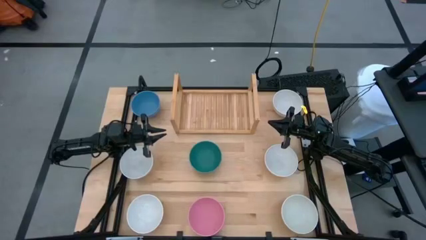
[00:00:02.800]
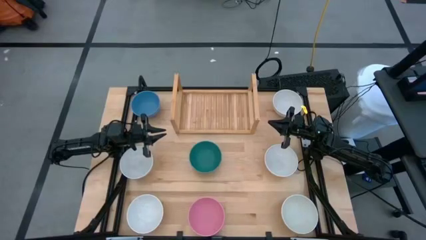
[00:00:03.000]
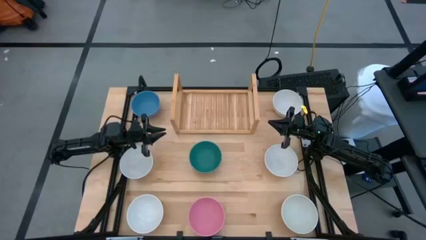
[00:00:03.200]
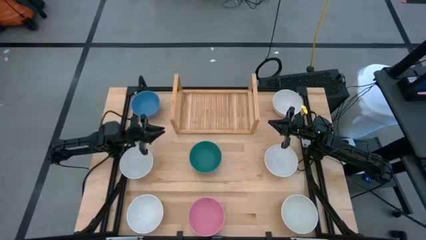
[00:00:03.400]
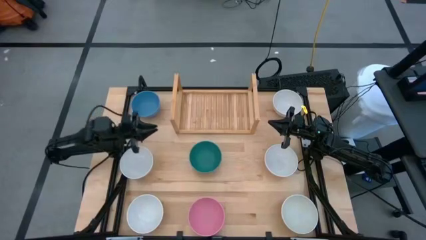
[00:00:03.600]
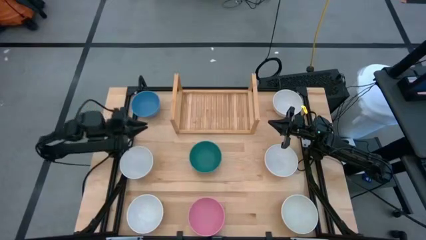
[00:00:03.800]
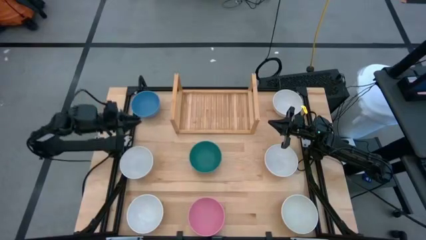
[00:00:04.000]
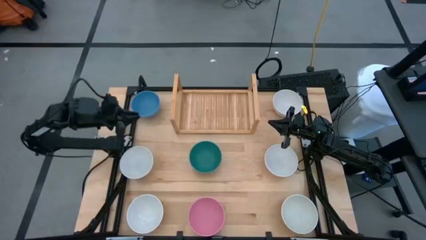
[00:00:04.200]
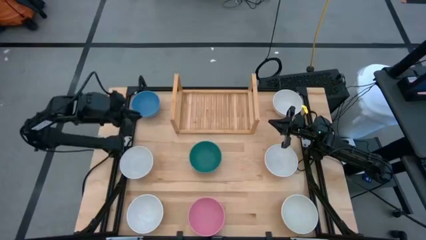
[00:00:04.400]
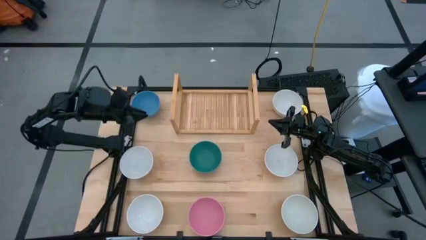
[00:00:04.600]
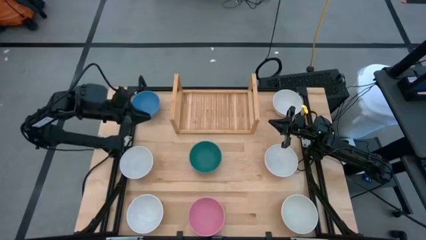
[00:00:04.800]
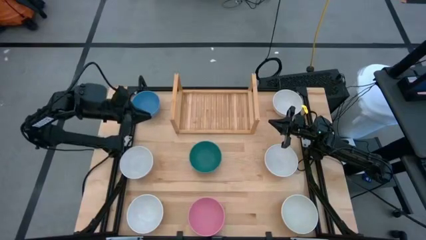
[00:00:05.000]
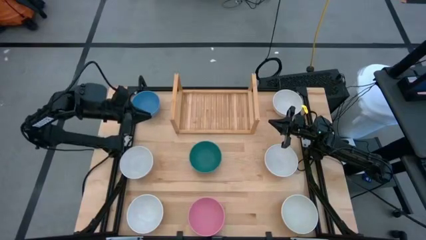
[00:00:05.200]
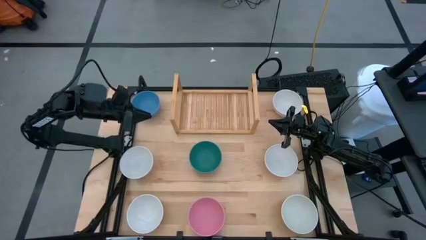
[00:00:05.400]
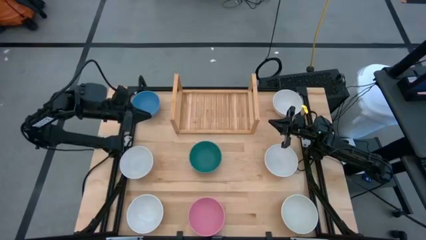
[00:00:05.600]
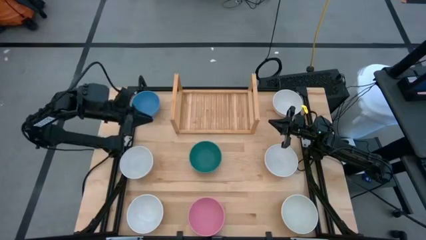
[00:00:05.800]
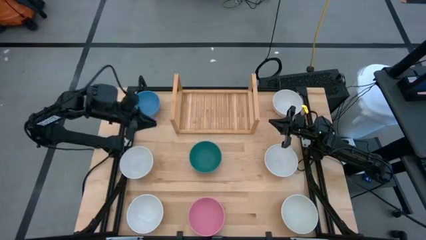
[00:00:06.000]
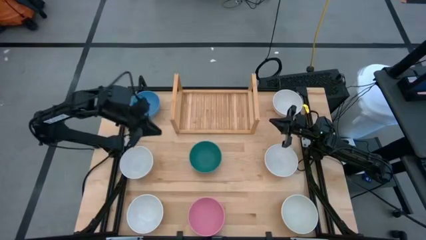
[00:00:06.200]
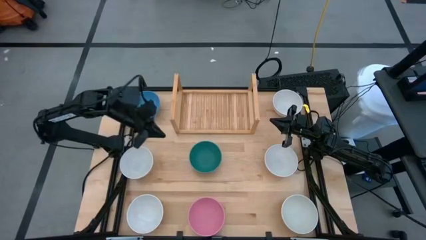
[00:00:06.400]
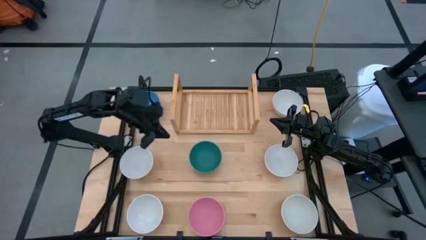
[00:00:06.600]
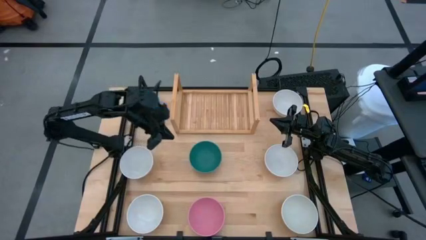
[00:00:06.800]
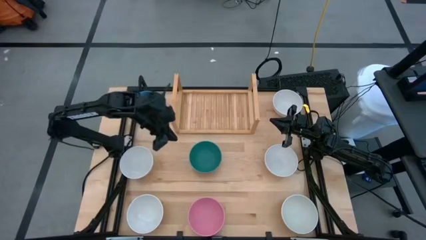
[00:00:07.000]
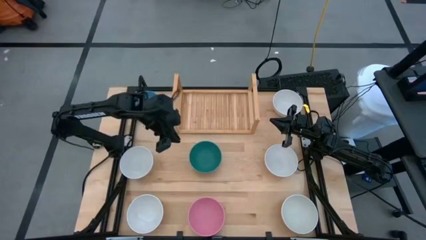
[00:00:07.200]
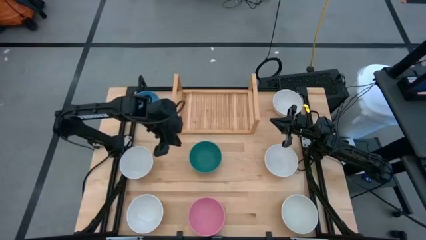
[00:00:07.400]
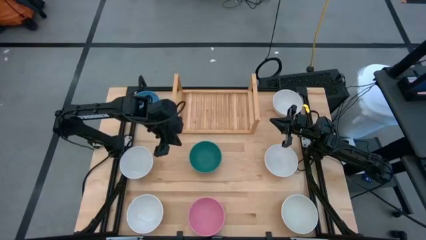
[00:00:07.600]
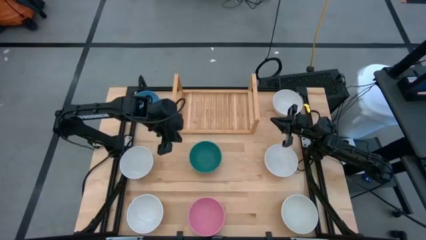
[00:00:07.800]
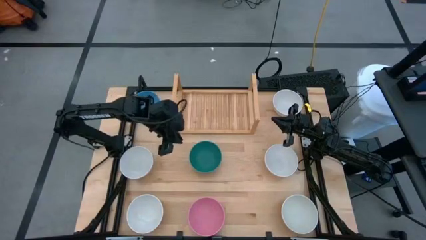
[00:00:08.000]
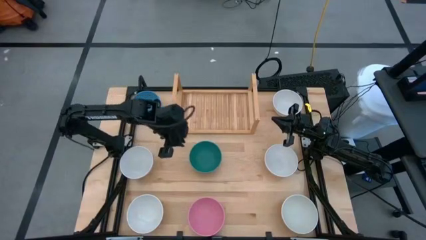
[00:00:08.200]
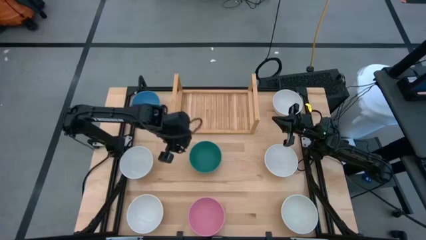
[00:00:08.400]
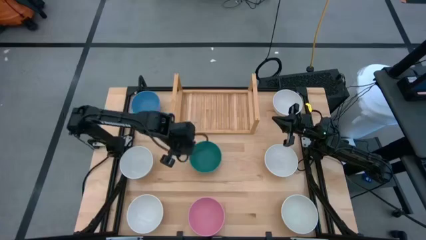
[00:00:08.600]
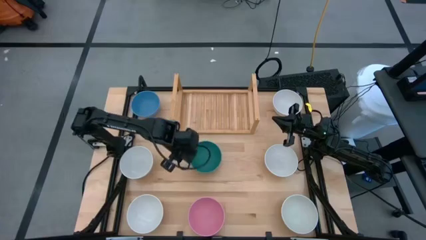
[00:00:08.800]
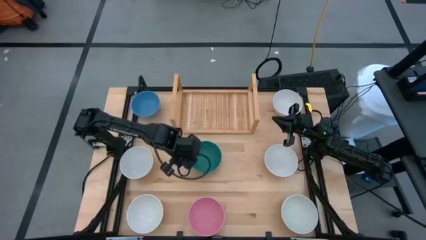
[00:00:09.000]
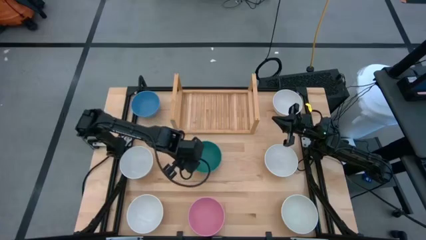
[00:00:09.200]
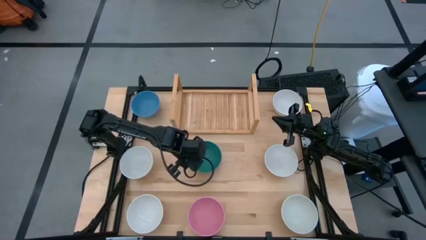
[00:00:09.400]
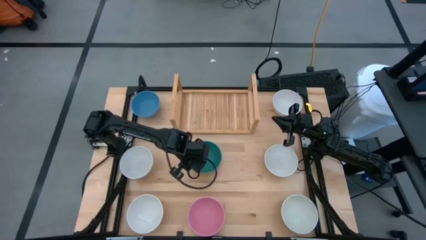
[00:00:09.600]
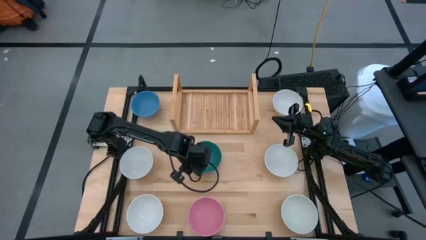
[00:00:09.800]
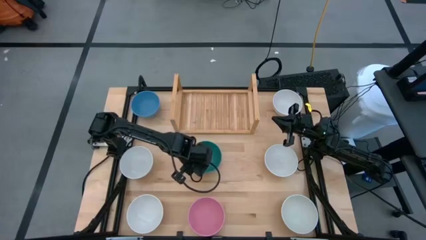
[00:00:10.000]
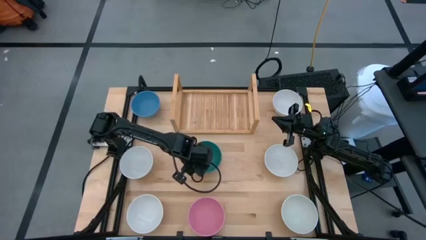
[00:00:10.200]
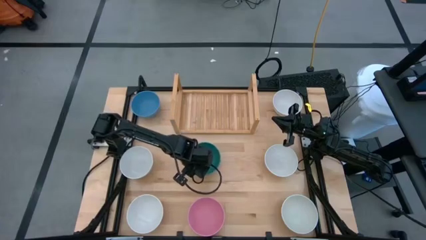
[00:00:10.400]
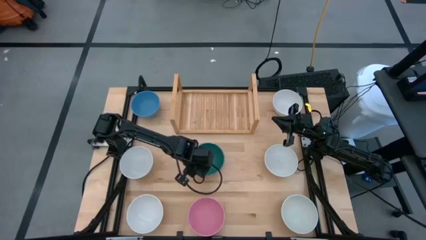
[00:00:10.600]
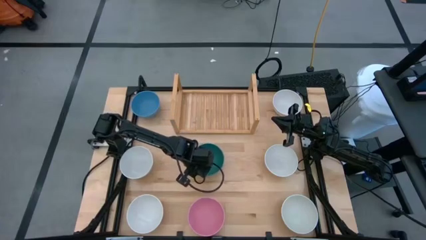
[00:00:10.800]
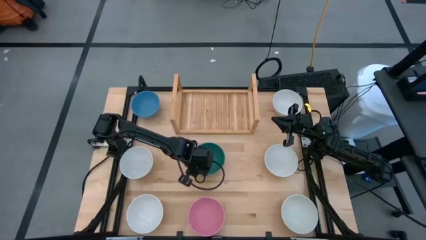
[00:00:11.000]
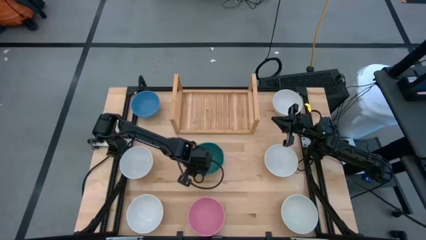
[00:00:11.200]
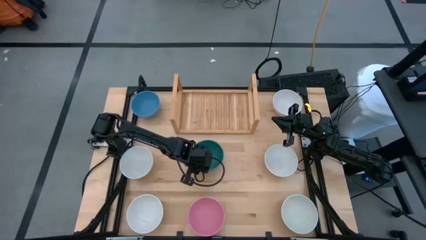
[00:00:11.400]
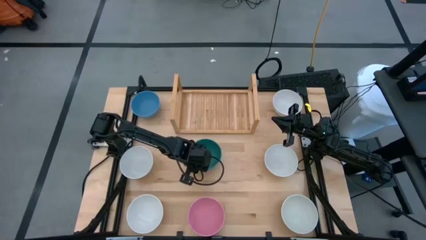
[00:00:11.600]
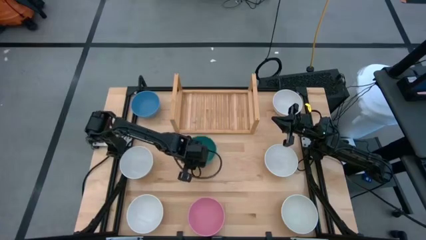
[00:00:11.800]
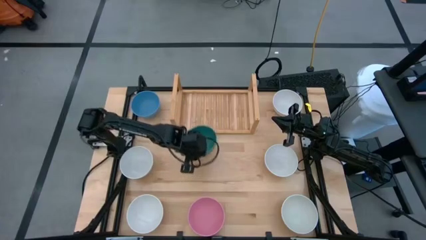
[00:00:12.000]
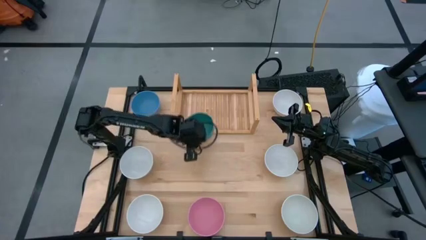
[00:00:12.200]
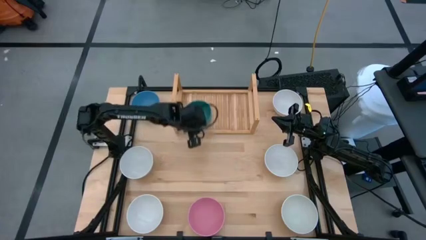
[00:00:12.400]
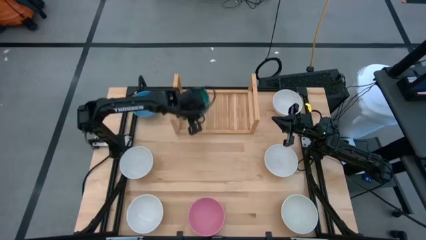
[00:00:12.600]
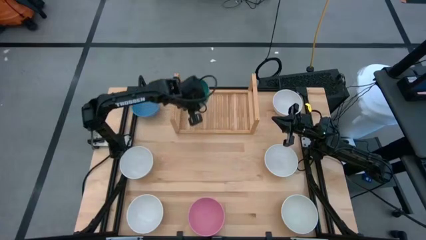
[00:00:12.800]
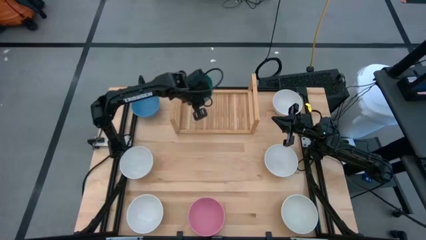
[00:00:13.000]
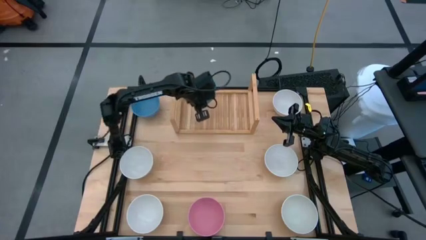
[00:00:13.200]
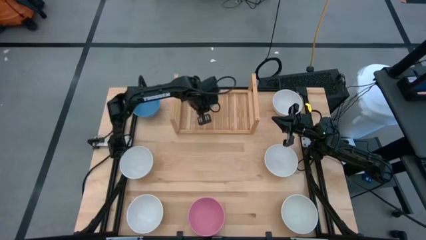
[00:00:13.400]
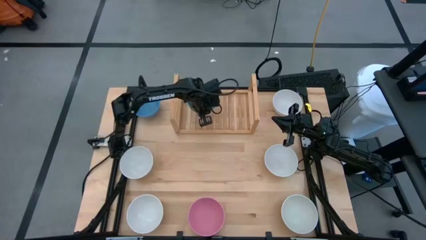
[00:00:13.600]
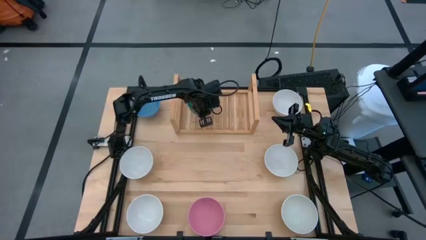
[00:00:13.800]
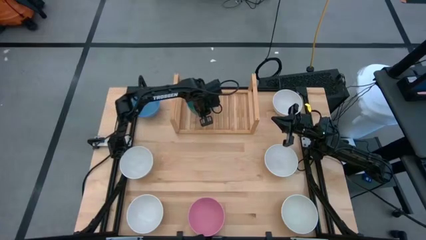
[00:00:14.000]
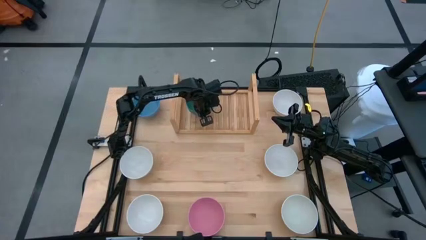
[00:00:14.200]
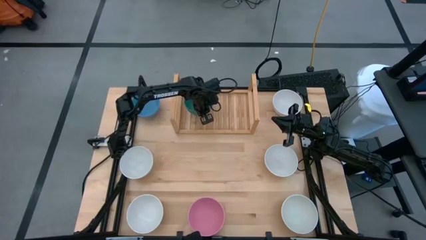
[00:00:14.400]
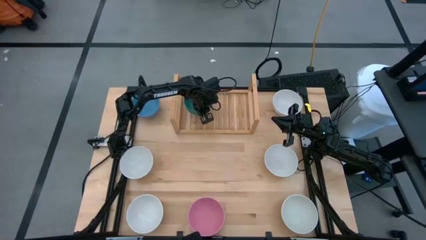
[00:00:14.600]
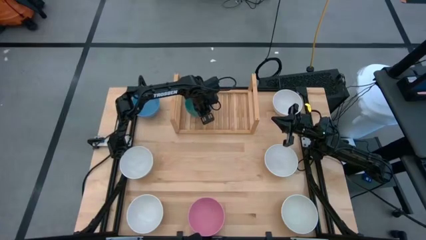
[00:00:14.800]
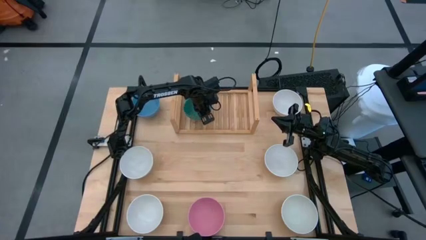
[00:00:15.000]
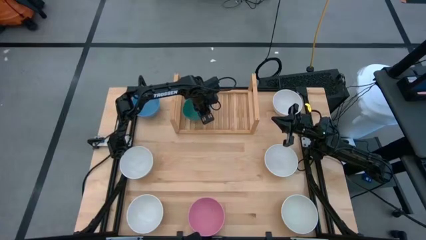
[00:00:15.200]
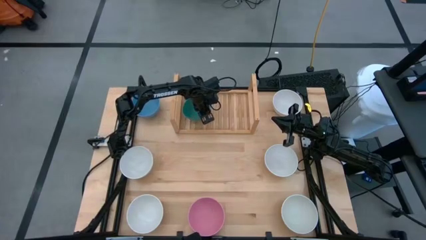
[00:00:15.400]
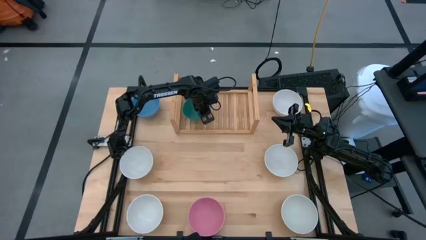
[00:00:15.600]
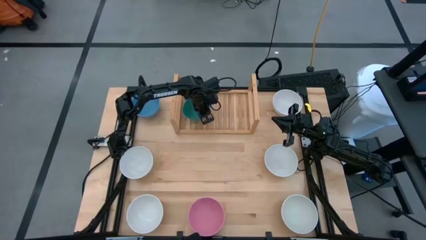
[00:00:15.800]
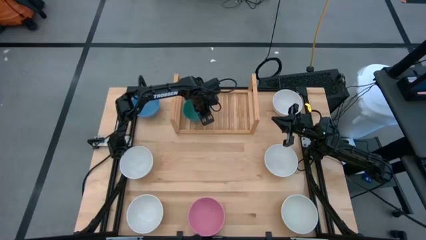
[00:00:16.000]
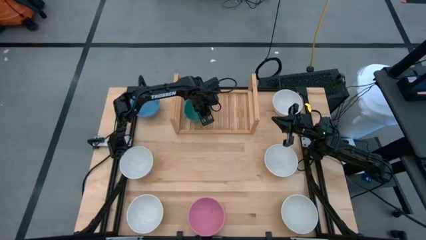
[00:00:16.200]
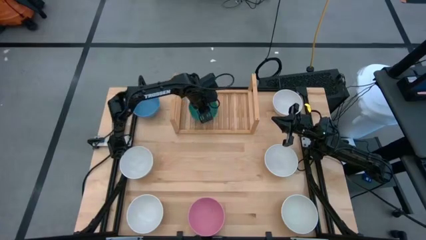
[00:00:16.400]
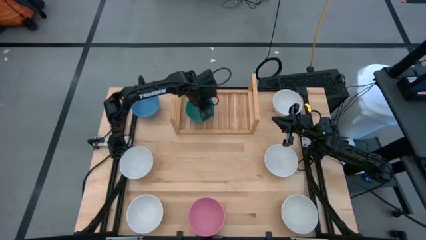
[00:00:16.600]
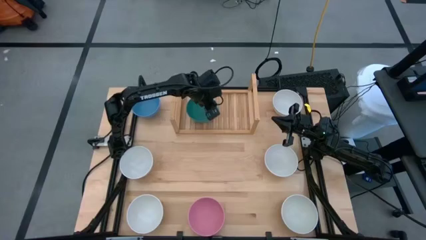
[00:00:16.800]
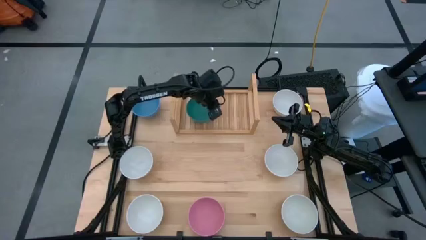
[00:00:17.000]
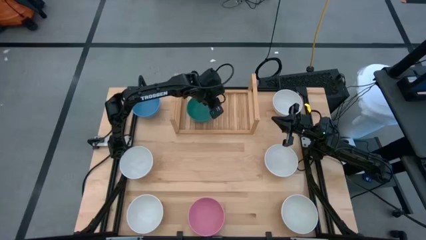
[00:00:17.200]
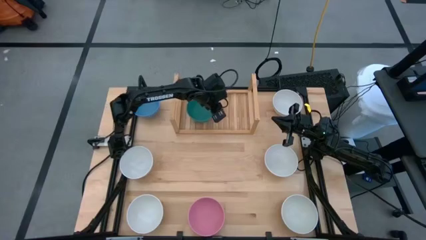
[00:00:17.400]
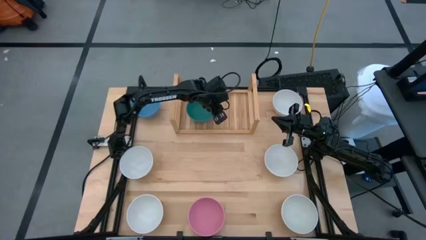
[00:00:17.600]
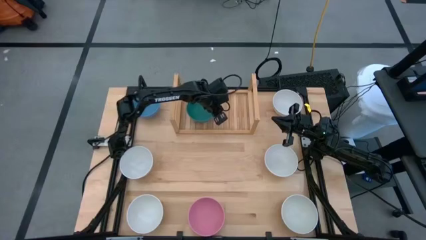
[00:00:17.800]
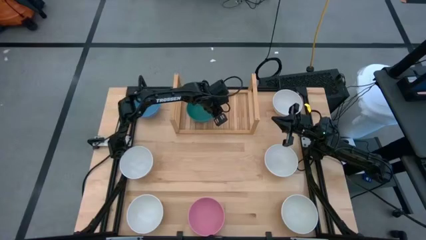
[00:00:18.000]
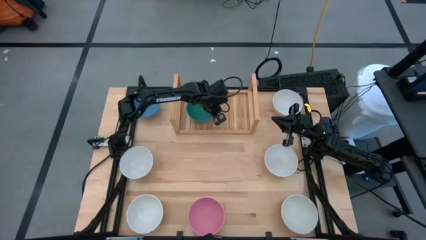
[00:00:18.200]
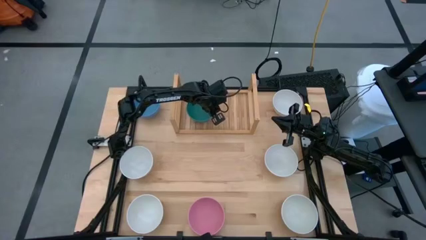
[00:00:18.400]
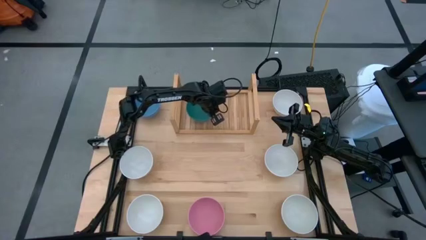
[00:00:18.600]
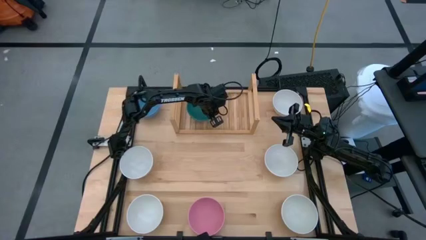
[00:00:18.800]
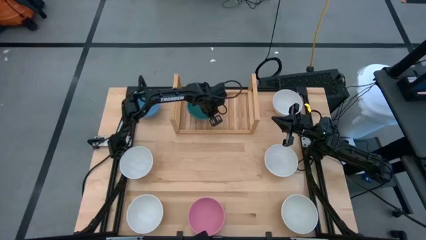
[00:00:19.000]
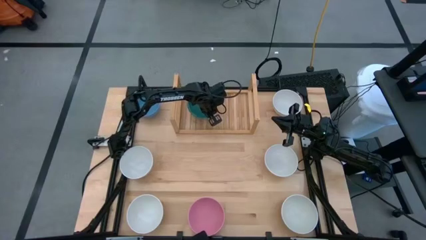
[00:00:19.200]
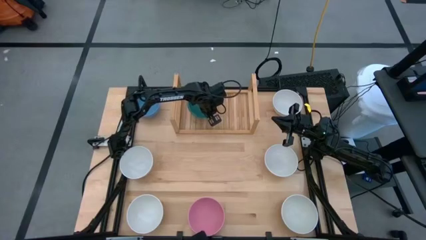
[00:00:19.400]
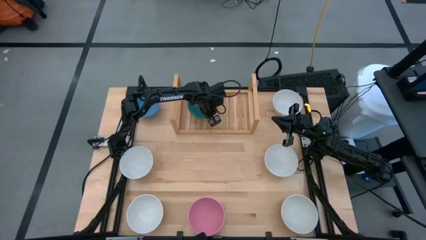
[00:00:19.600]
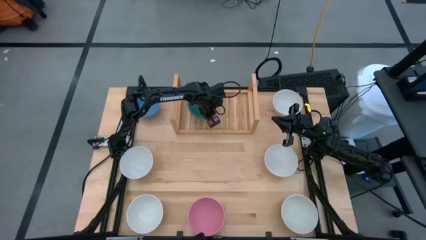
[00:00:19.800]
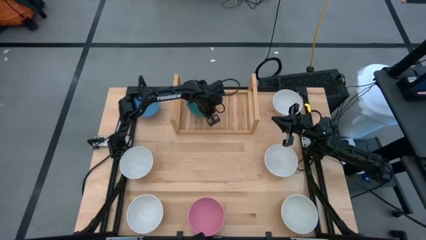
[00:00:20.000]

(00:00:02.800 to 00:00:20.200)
Task: Place and stack bowls onto a shelf
Put the dark green bowl on the shelf
